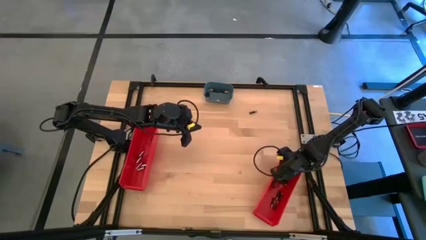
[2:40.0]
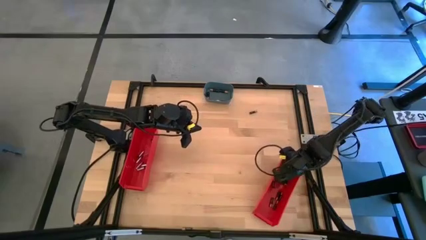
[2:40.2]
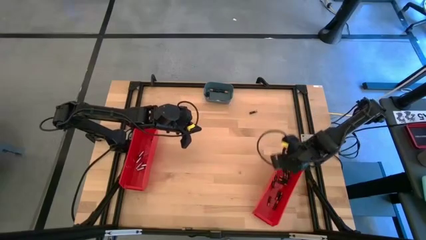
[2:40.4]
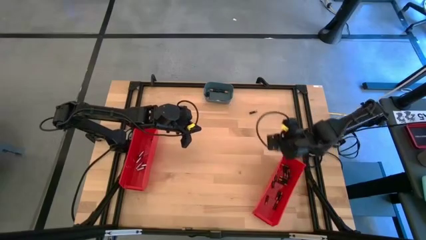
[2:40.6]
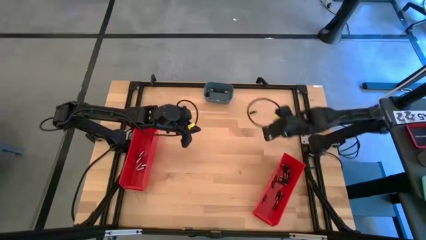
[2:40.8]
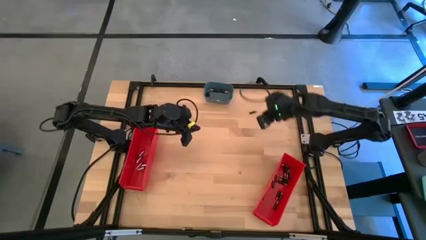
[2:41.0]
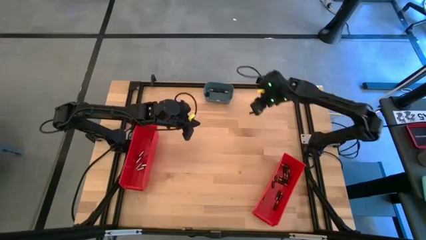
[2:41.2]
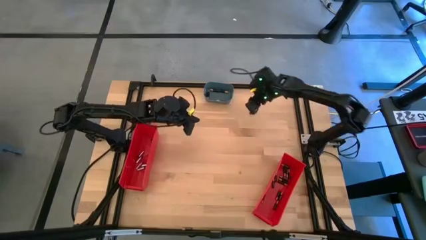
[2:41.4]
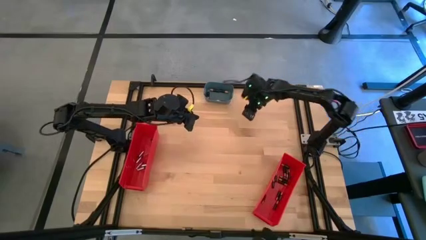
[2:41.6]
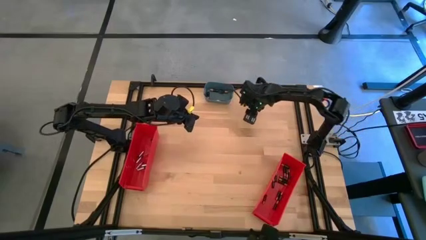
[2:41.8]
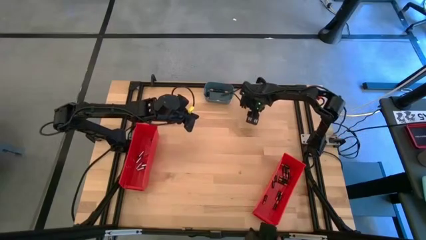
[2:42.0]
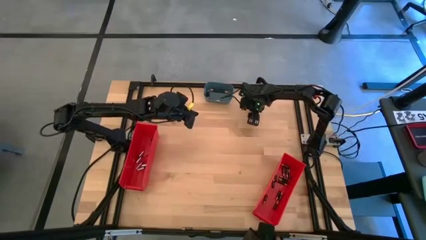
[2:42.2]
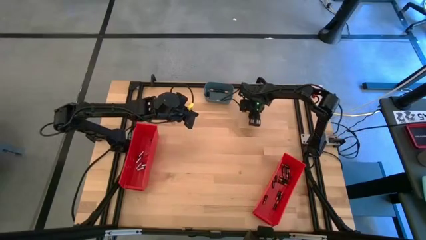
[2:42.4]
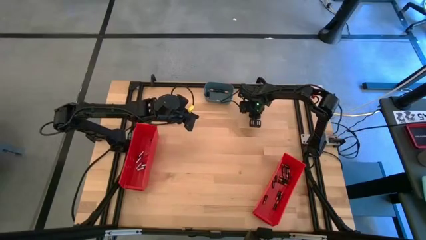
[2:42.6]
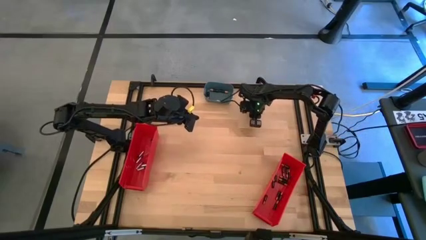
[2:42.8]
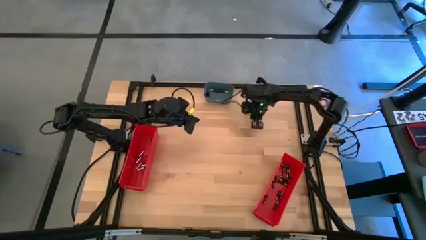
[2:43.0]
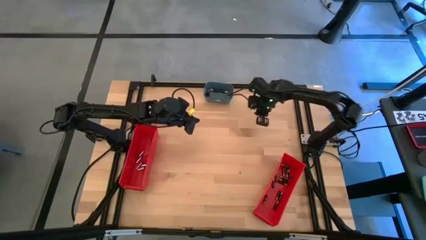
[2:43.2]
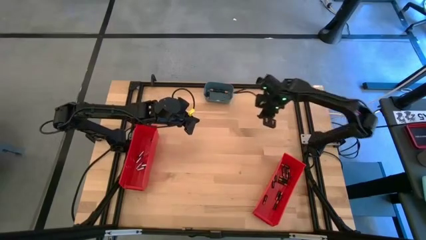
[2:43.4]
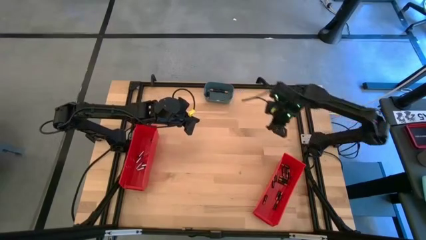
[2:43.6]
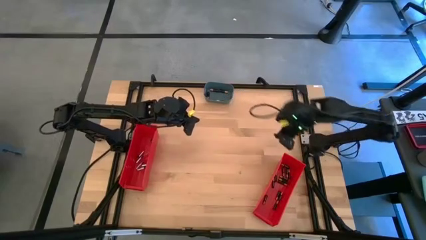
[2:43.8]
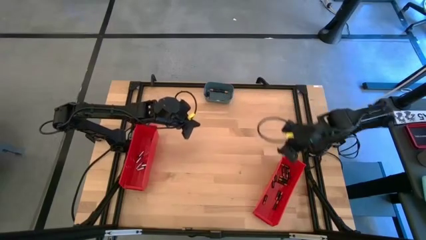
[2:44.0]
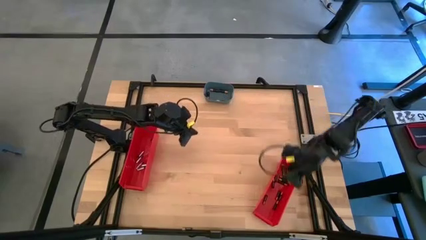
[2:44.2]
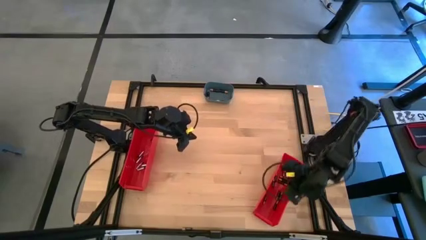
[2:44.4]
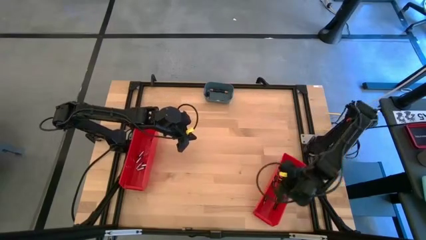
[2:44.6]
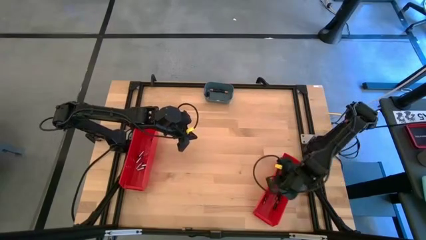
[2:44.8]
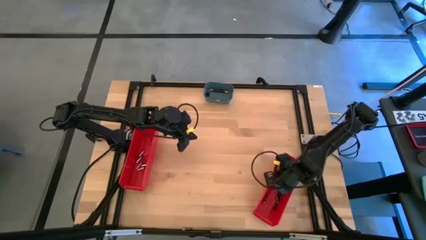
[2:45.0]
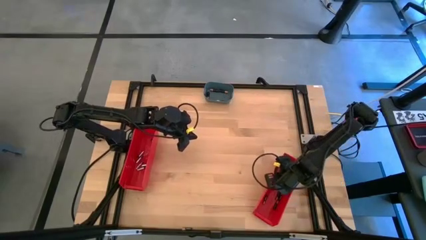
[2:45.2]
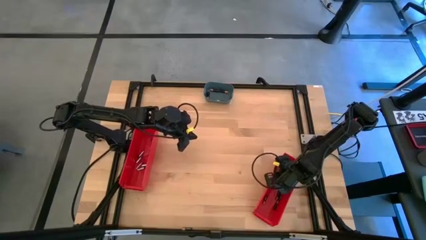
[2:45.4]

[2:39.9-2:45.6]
Task: Sort batteries
Put the small brown battery into the right red bin

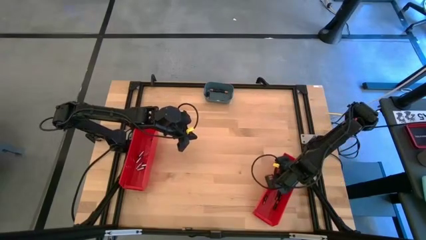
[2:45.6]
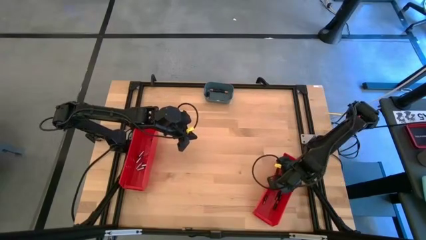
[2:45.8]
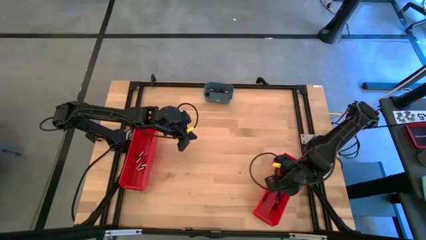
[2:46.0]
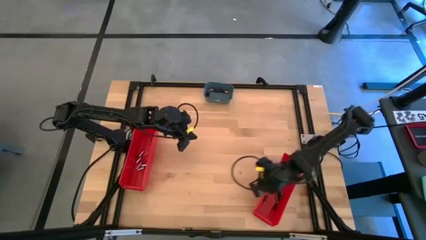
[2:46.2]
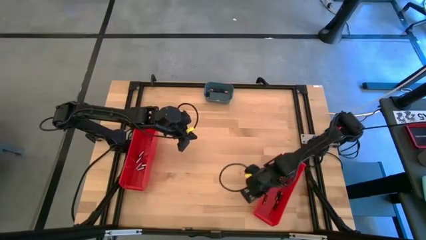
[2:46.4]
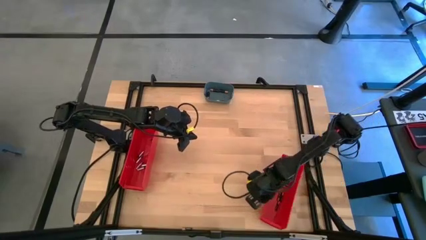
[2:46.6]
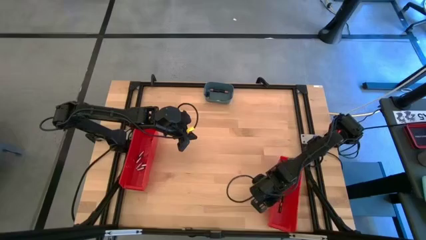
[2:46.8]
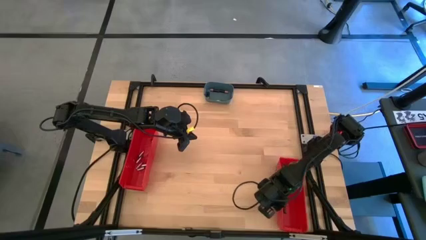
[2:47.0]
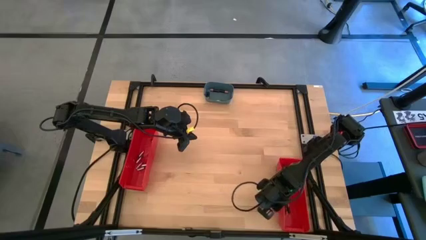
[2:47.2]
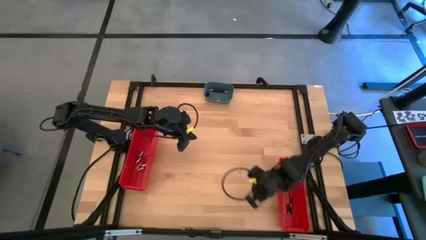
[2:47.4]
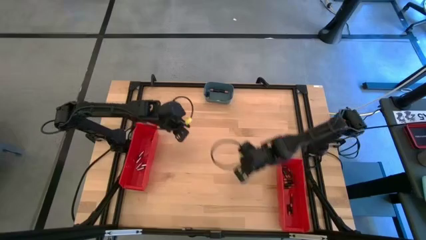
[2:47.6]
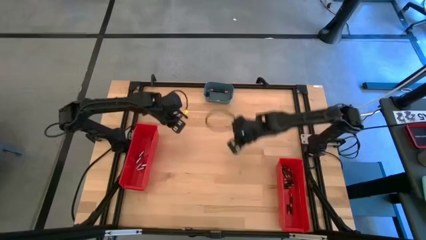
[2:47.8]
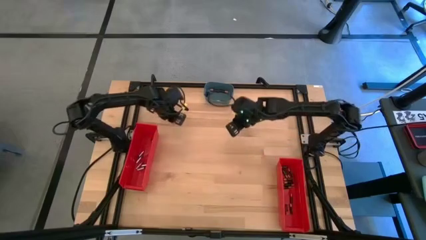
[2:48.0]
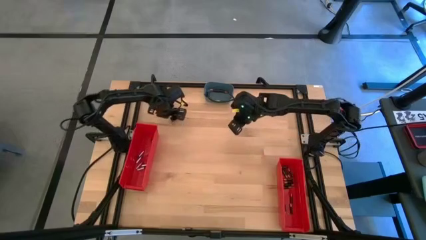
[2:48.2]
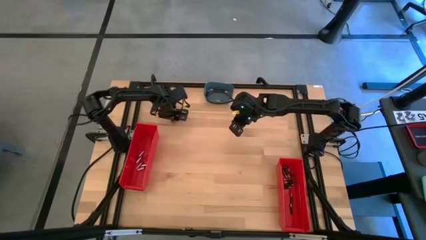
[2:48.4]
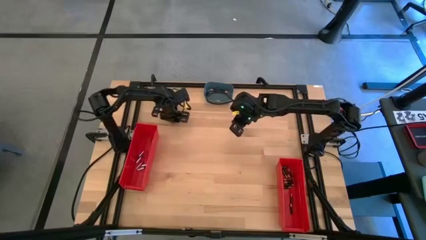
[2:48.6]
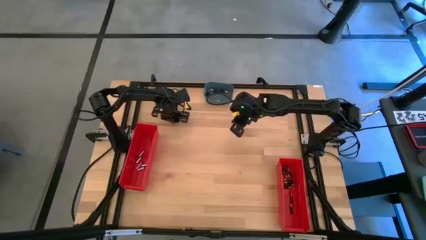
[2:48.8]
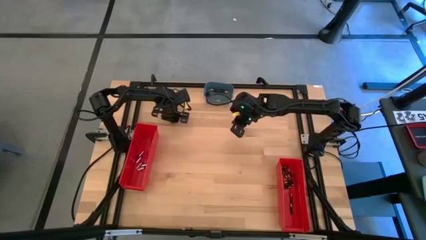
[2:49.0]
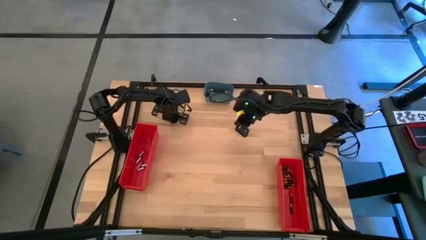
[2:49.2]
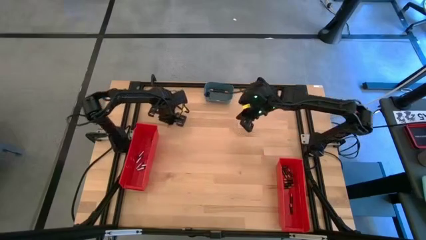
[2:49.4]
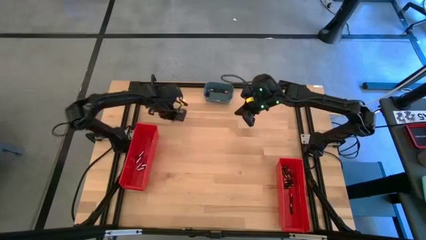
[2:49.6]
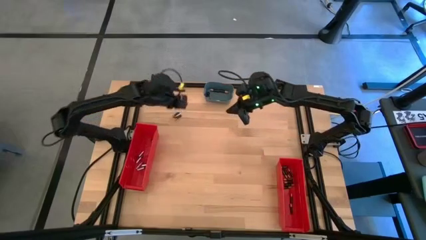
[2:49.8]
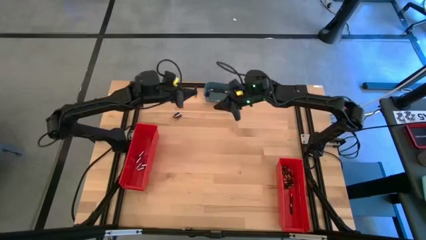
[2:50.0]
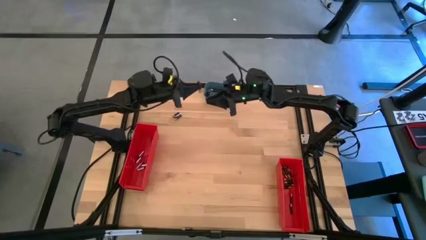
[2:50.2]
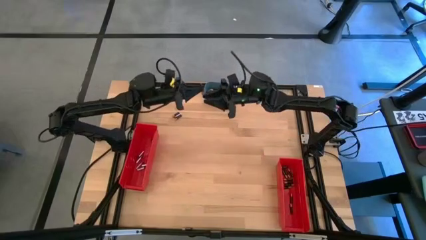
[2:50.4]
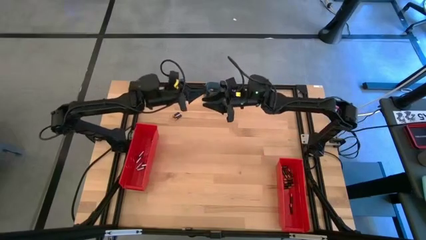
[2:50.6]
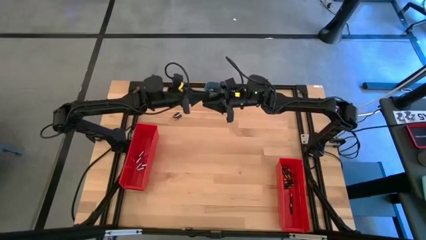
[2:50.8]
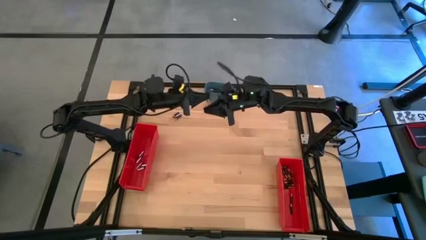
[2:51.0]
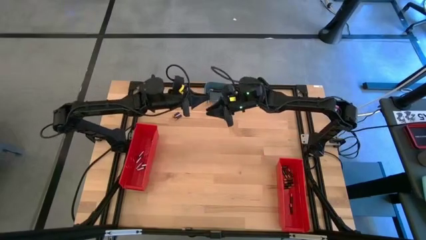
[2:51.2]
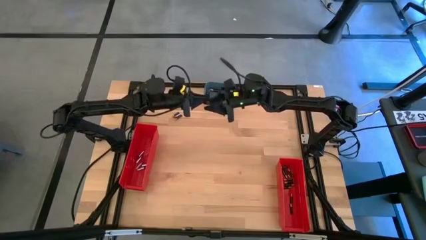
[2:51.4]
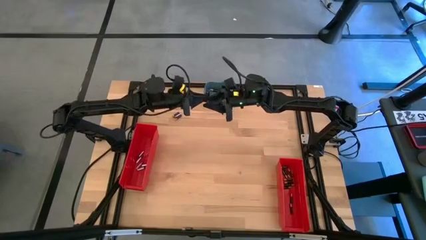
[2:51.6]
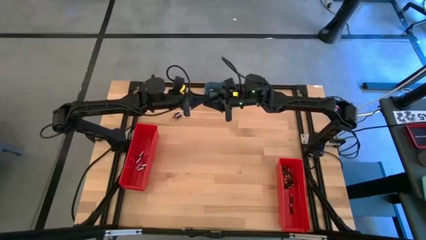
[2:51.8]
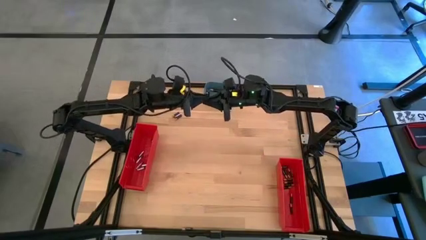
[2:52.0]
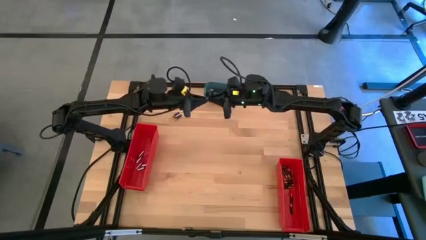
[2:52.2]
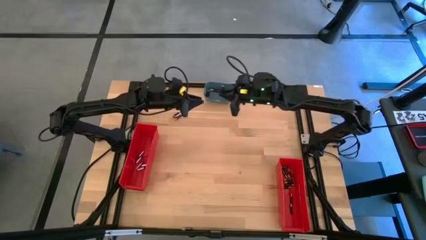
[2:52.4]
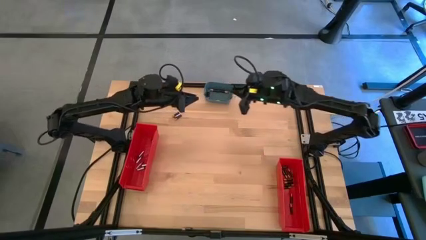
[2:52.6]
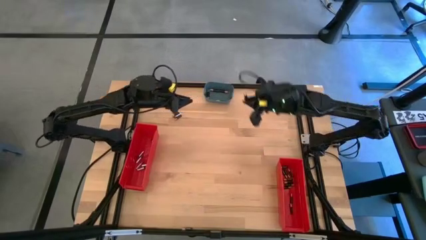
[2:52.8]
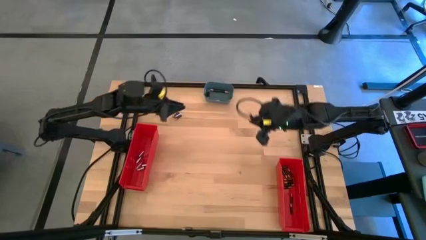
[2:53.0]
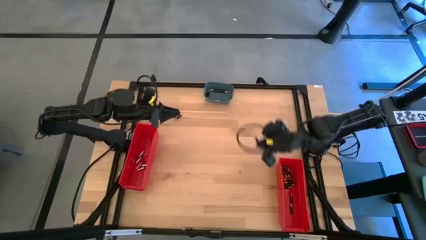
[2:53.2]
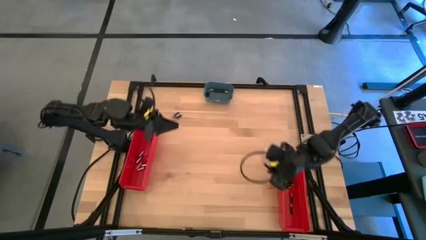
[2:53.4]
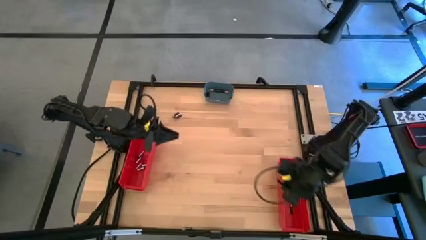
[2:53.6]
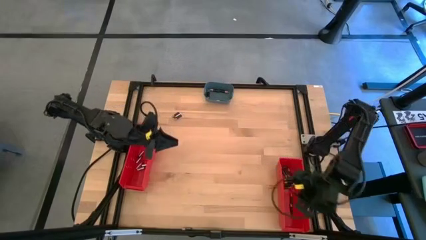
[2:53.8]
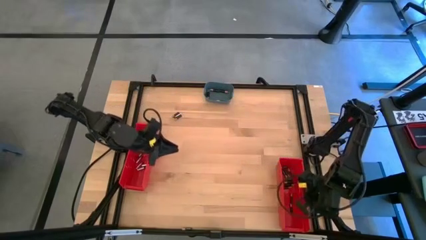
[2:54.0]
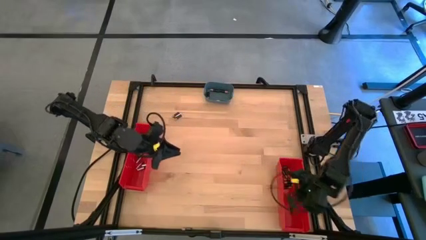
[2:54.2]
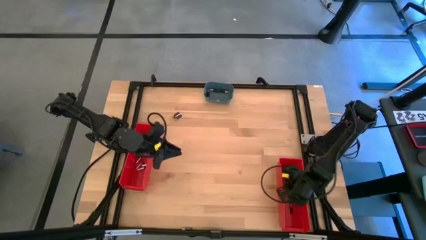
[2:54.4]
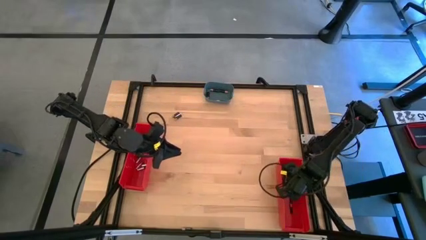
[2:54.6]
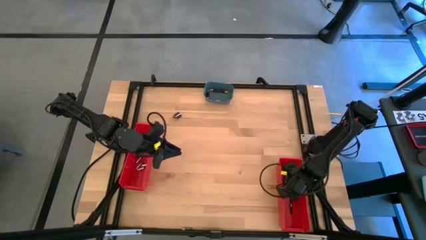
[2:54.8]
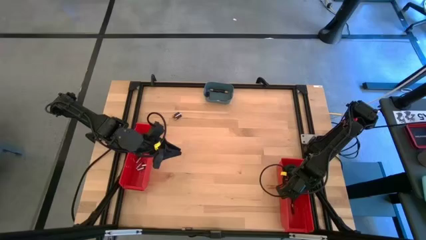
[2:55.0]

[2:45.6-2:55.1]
Put the small brown battery into the right red bin
